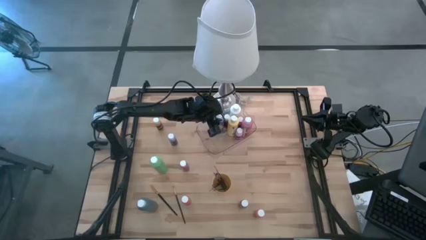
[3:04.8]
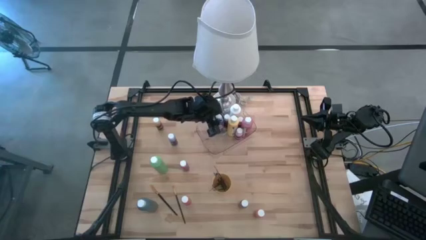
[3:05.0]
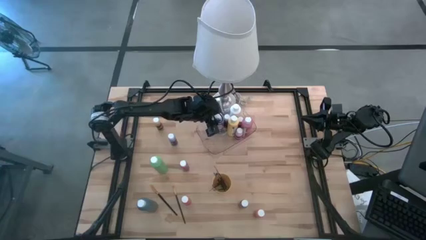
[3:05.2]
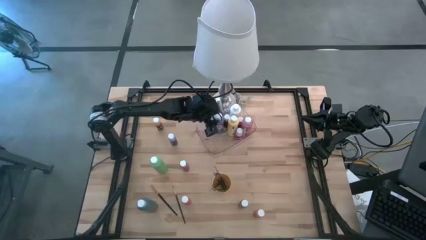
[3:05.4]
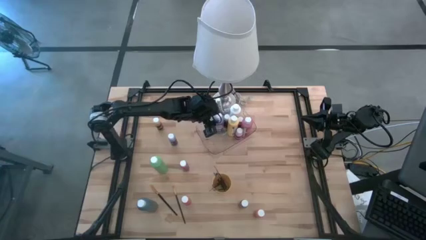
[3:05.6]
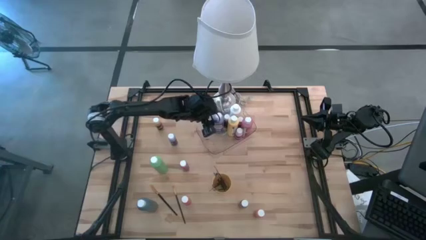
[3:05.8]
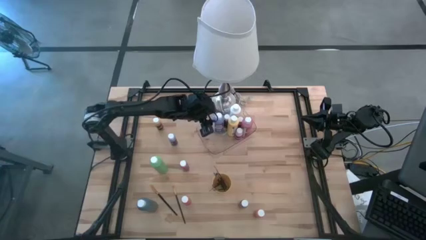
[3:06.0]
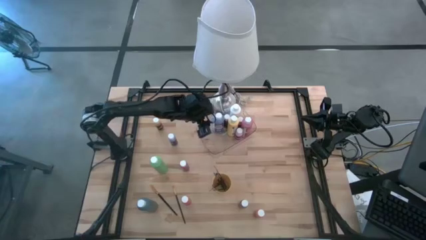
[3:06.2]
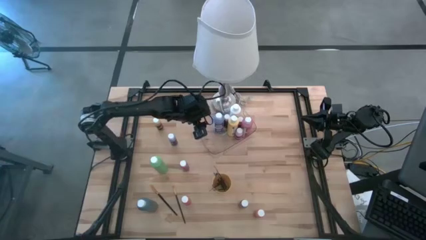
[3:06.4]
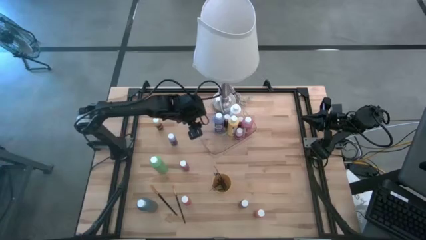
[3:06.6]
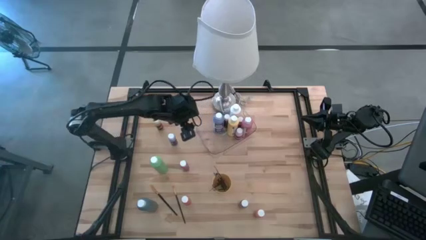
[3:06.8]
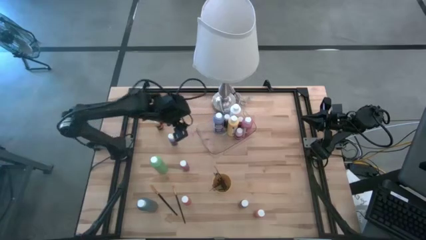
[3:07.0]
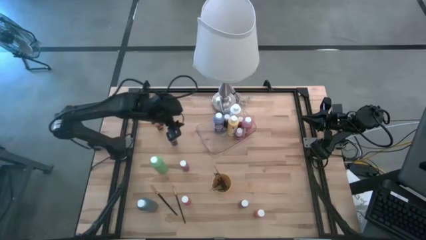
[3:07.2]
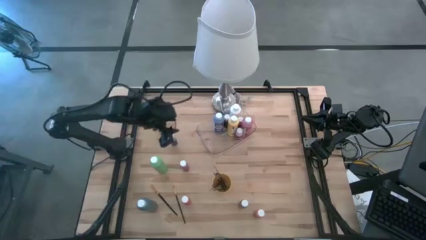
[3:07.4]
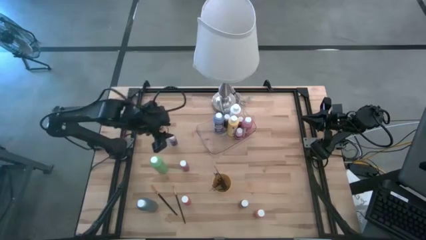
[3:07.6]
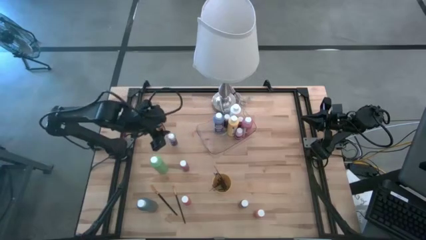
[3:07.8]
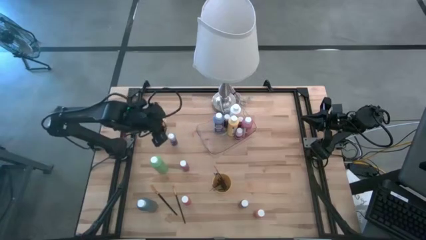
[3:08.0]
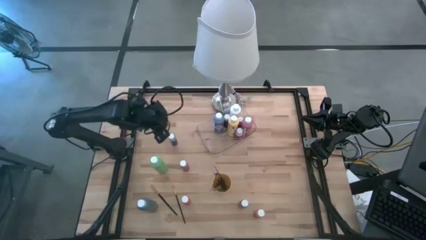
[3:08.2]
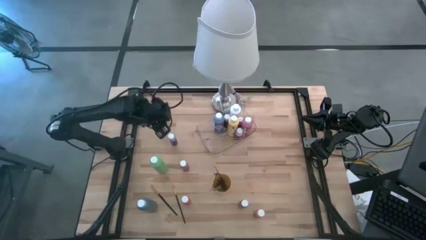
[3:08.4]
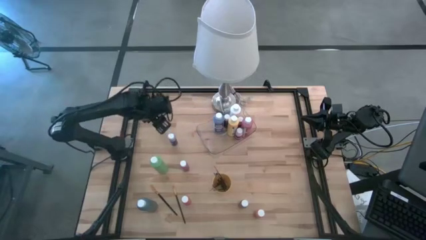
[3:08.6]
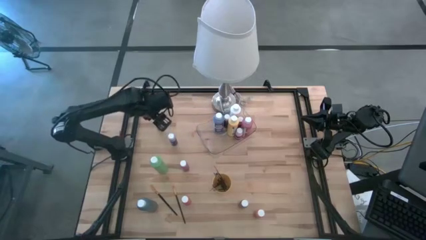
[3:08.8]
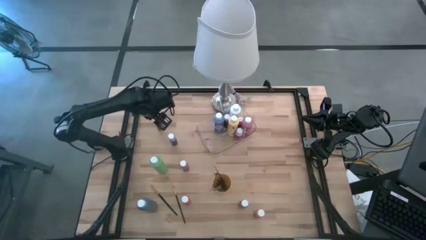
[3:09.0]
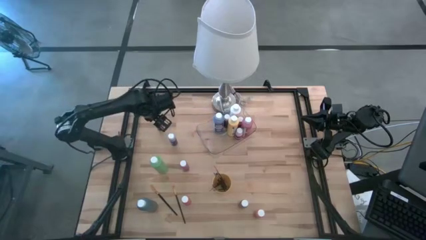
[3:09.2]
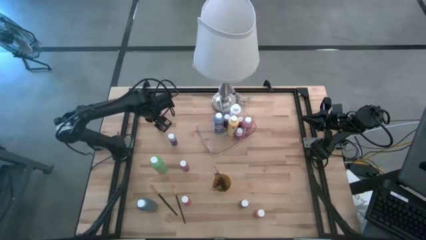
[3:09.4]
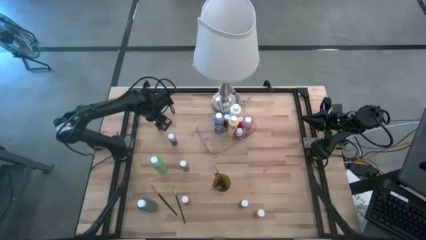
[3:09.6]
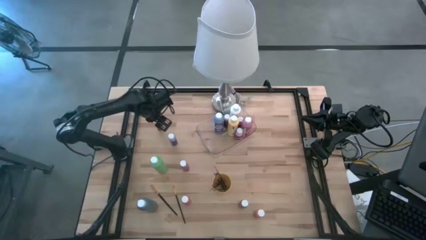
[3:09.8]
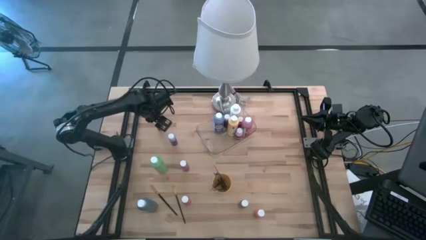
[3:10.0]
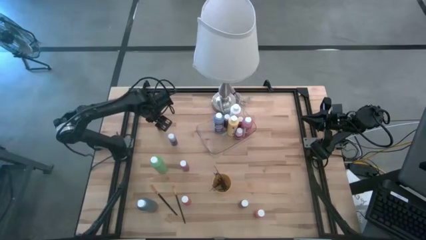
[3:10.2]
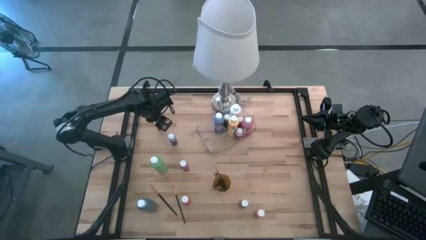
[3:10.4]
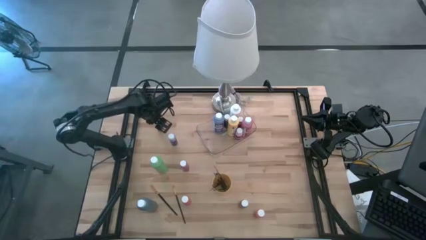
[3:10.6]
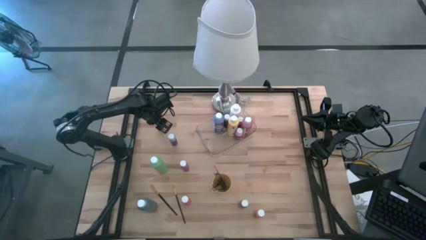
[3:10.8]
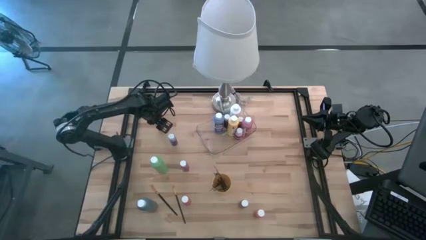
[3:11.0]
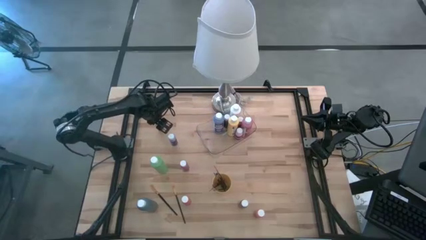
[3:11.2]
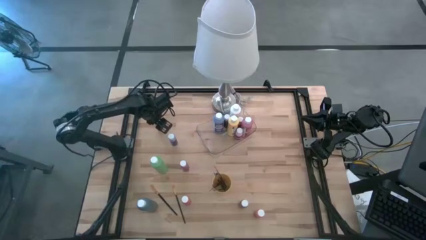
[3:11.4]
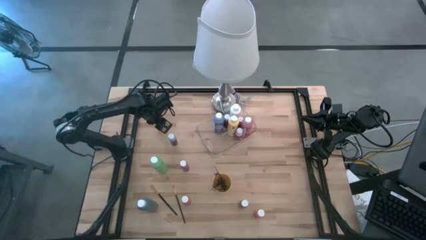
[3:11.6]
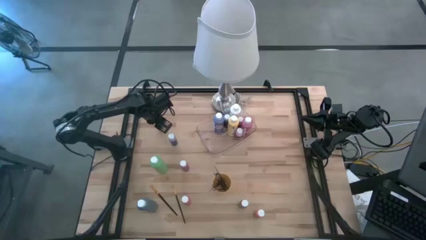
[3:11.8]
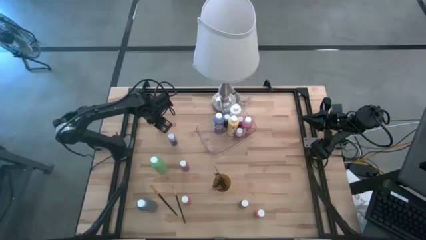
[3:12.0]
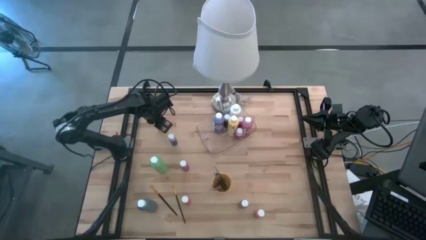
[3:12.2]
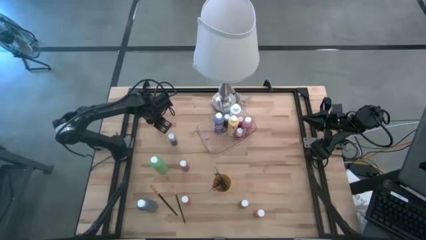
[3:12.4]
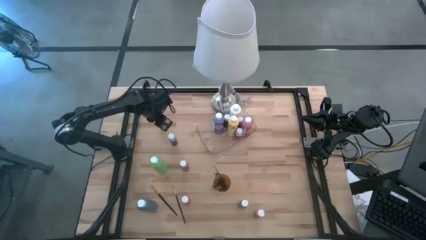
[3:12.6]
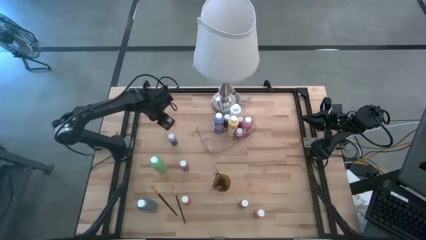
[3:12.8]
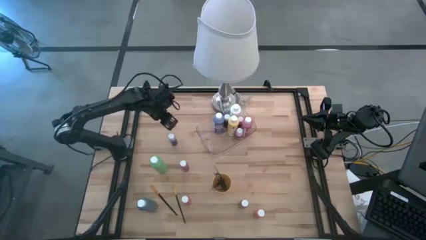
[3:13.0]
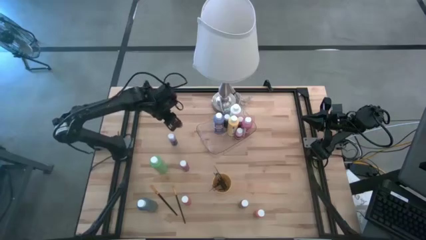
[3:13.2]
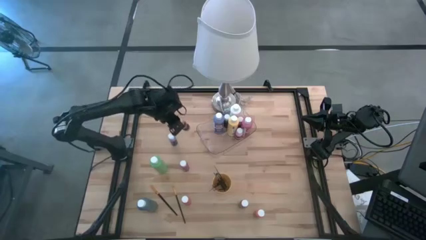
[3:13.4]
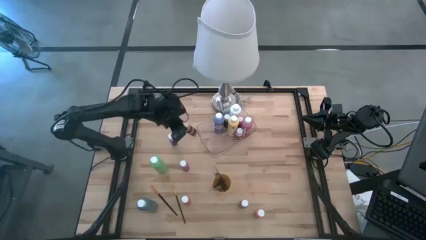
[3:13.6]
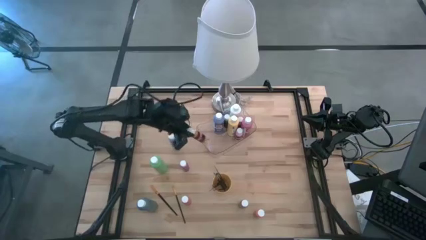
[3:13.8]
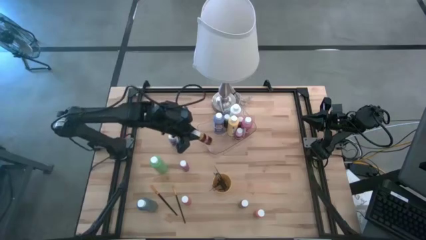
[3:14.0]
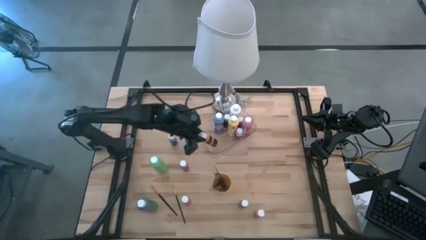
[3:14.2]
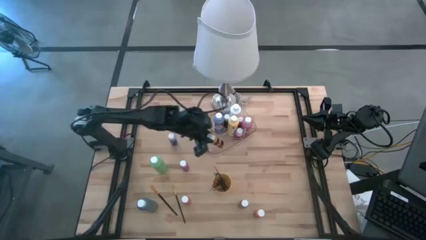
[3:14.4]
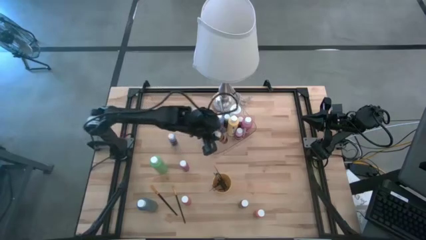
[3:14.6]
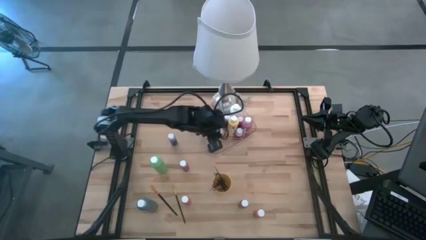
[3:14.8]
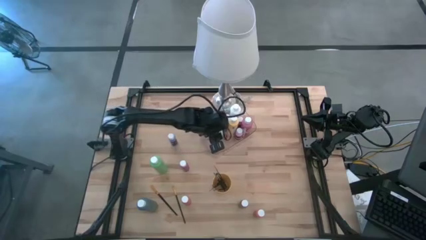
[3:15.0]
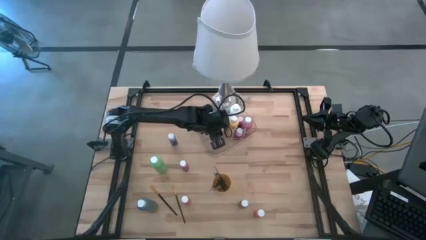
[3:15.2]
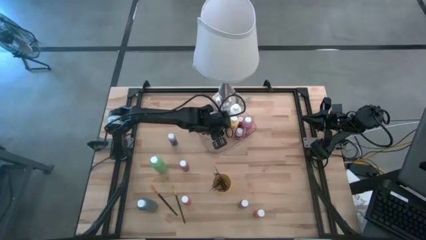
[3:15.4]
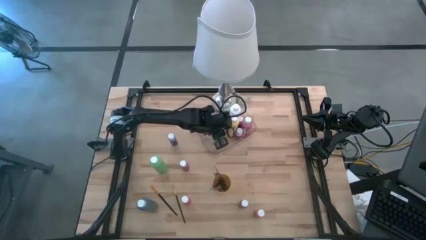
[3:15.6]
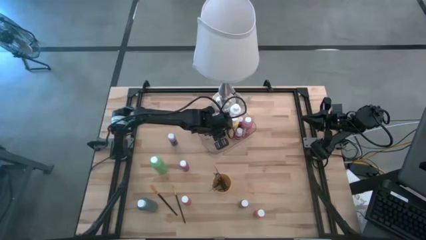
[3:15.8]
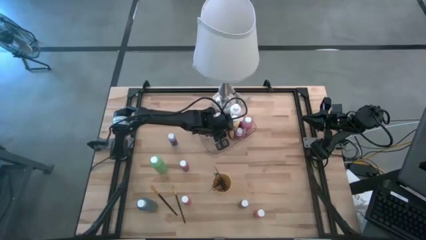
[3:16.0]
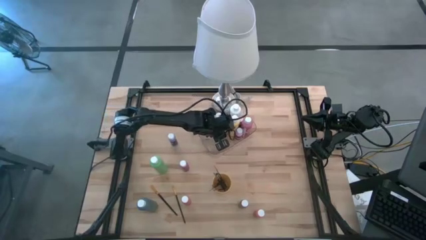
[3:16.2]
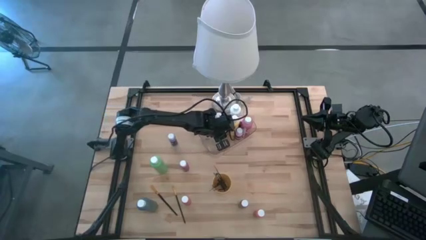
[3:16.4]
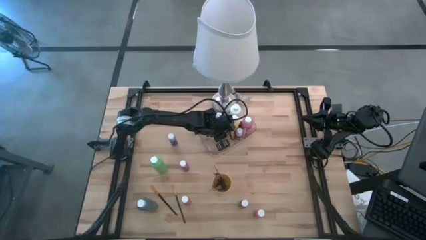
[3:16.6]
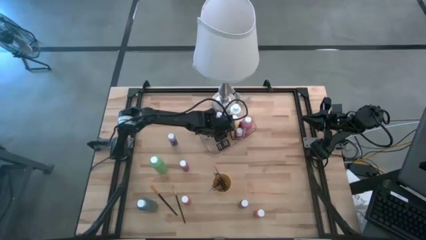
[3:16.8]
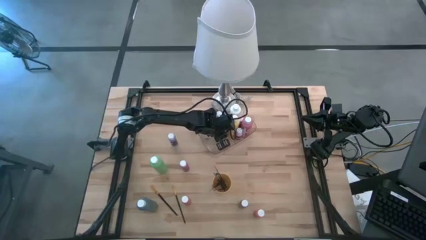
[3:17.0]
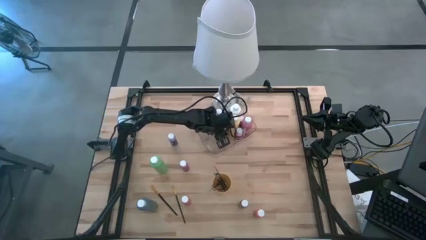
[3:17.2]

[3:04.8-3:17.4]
Task: Pick & Place Paint Supplies
Put the yellow bottle into the transparent bin

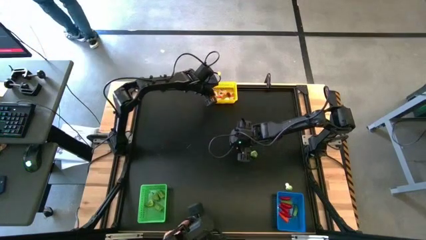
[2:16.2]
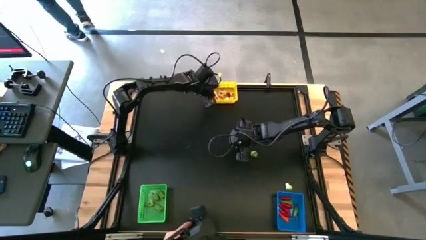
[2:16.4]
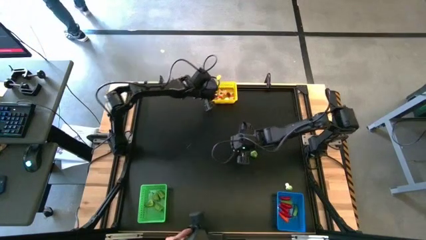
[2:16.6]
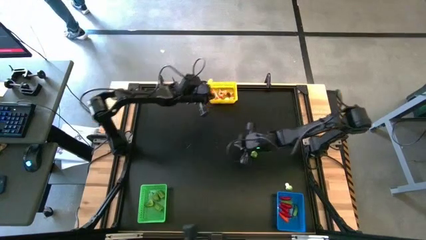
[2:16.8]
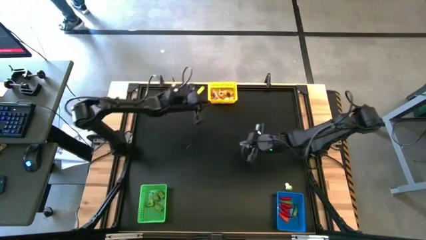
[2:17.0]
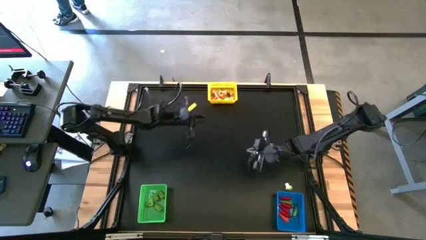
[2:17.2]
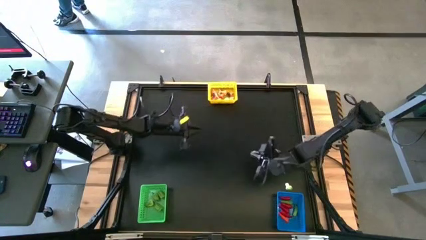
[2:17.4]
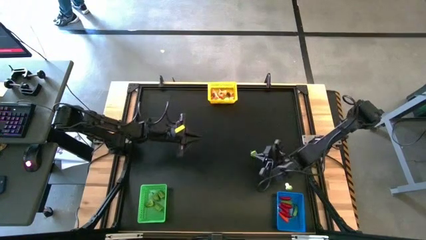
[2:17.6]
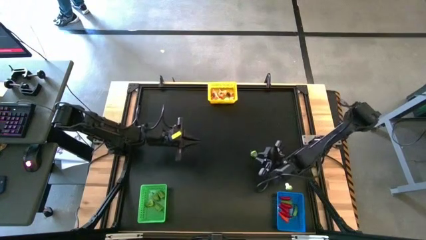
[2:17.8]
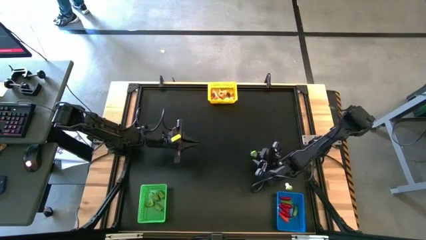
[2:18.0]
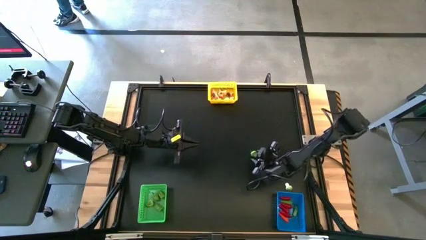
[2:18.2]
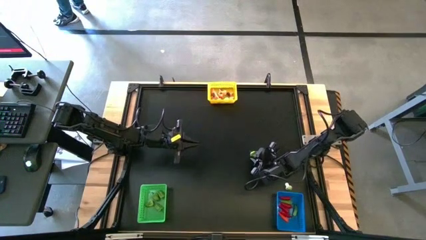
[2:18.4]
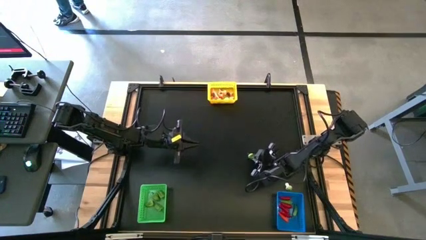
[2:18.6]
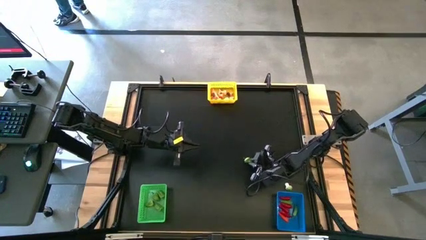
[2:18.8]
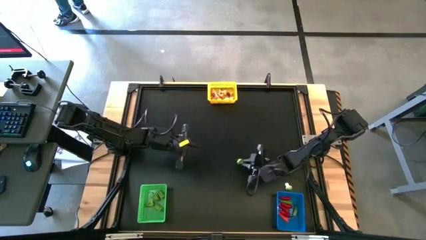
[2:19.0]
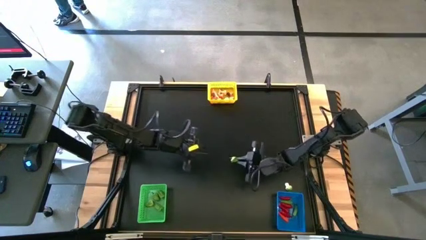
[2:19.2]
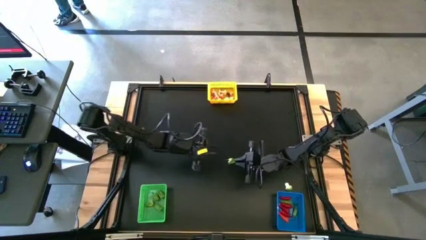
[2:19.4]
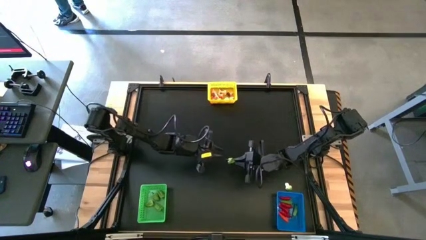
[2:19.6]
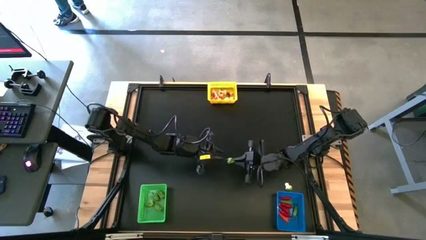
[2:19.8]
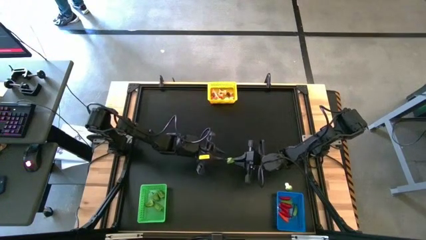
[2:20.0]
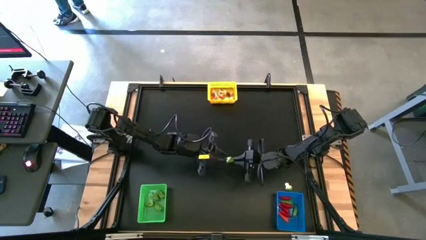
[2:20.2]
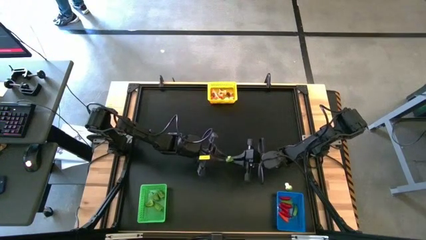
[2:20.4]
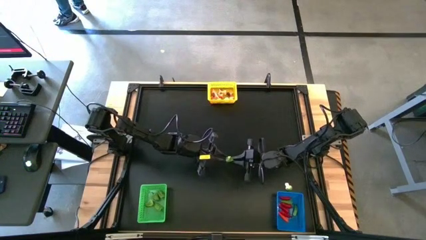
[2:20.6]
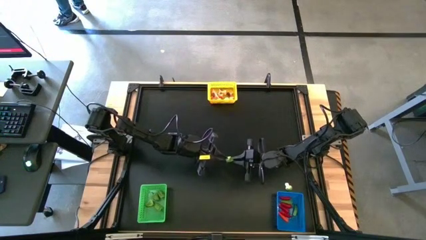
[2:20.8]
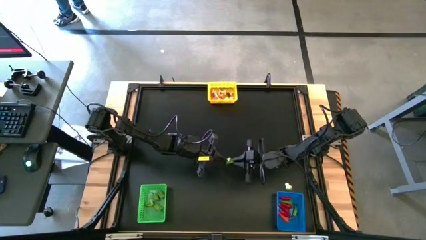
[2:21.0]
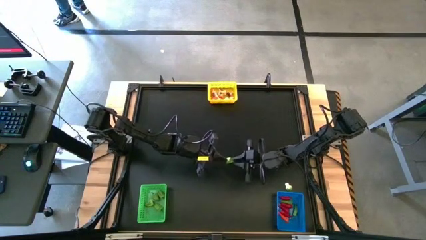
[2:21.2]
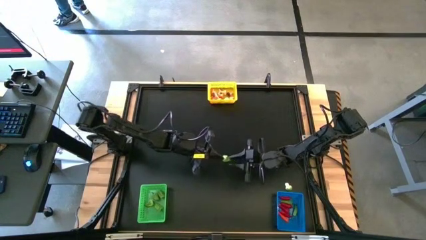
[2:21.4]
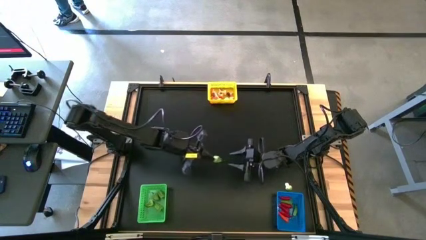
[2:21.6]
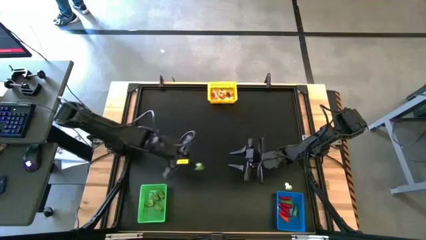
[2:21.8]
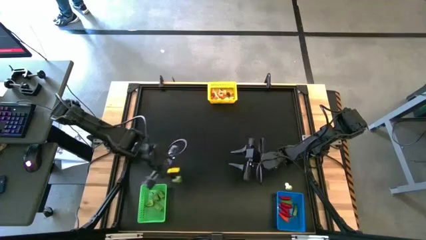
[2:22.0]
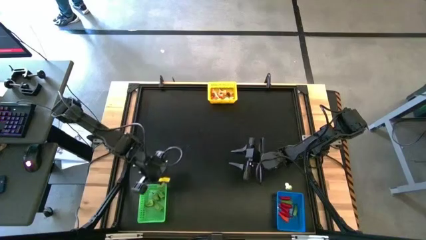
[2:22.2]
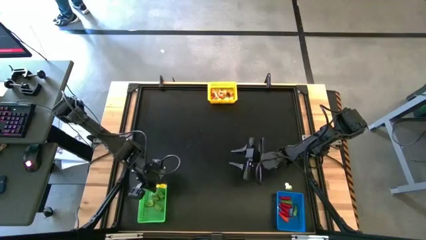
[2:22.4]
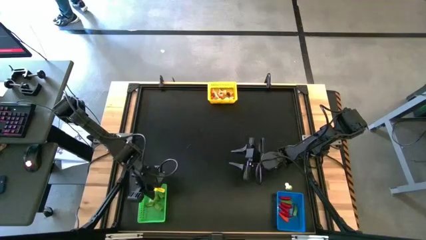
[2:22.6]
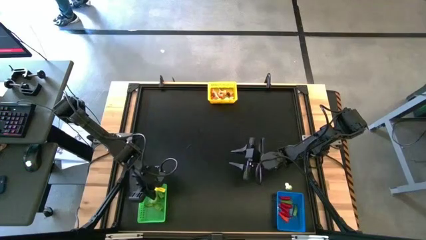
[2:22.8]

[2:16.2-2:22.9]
Task: Sort produce into baskets
Put the green pepper into the green bin
